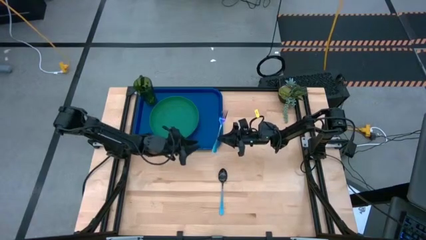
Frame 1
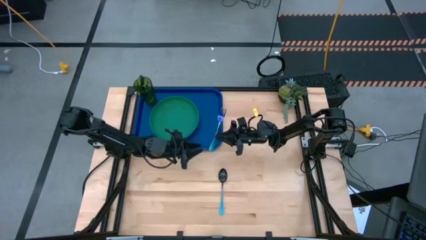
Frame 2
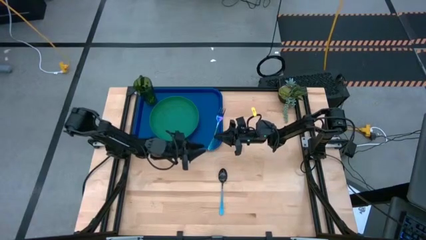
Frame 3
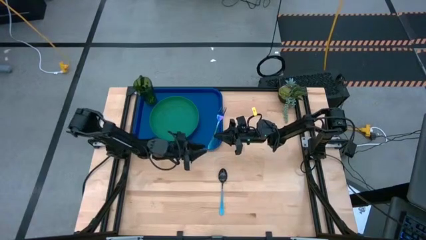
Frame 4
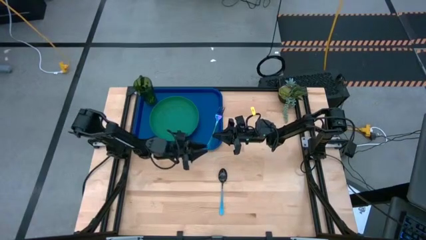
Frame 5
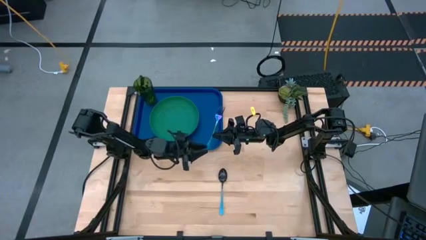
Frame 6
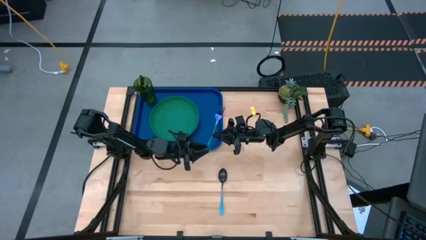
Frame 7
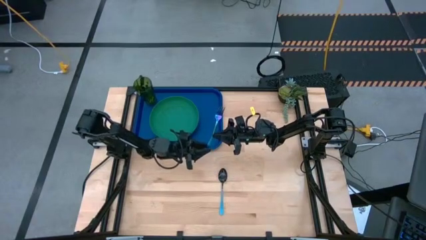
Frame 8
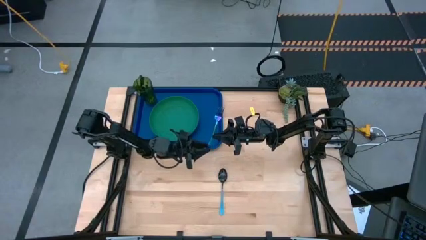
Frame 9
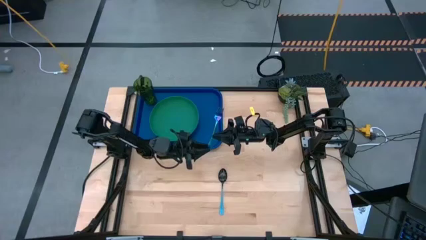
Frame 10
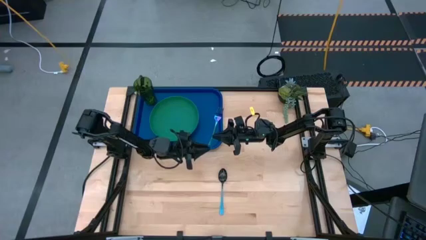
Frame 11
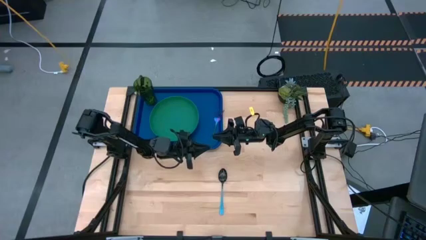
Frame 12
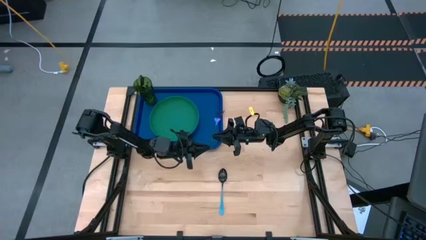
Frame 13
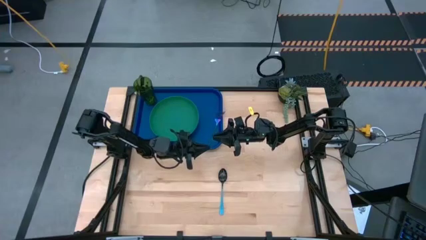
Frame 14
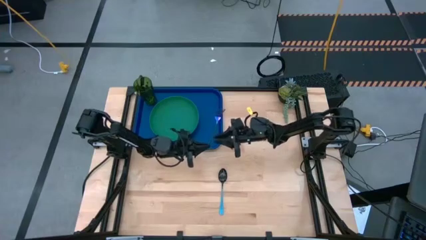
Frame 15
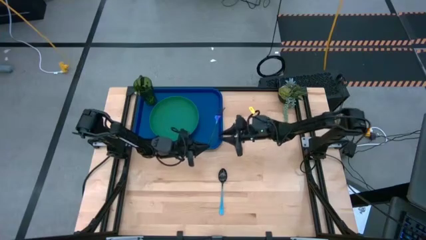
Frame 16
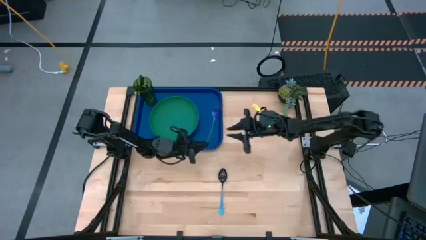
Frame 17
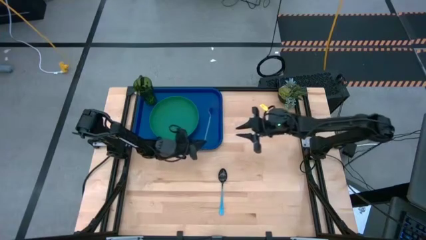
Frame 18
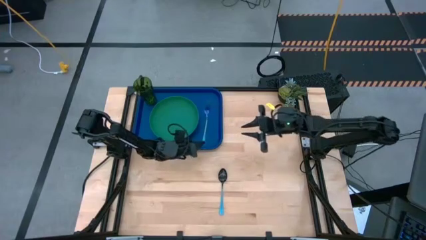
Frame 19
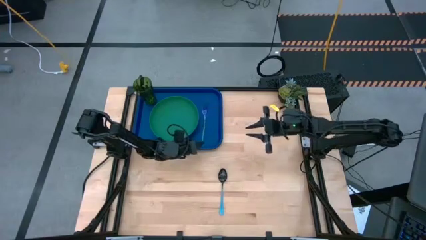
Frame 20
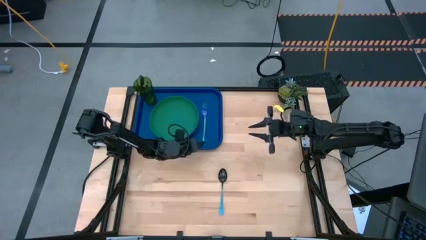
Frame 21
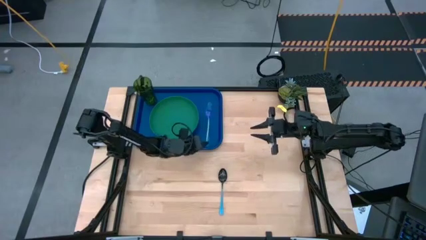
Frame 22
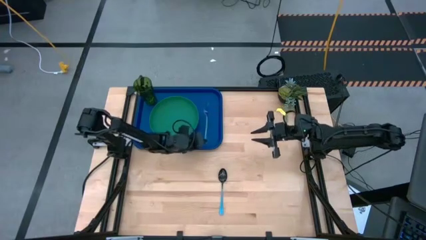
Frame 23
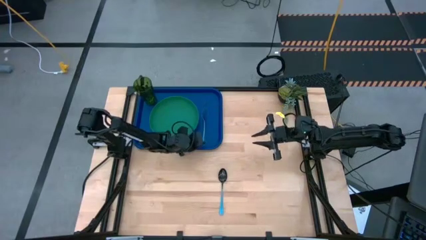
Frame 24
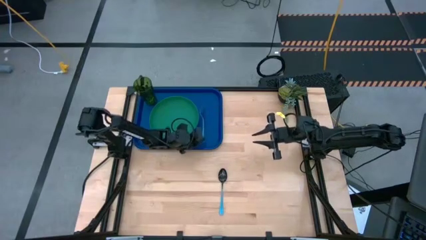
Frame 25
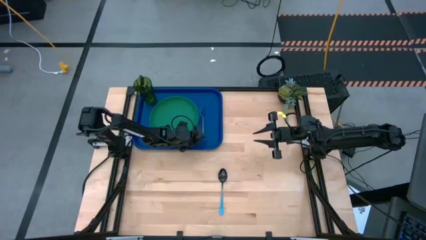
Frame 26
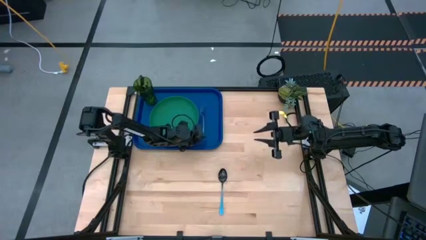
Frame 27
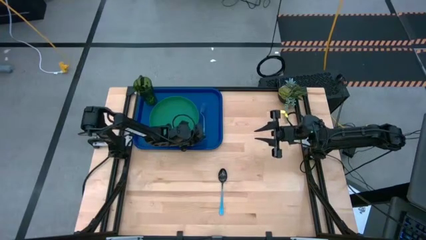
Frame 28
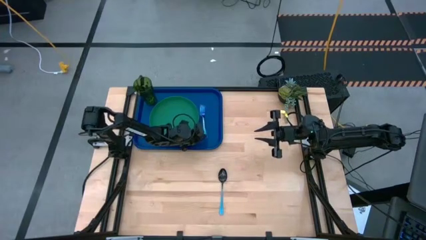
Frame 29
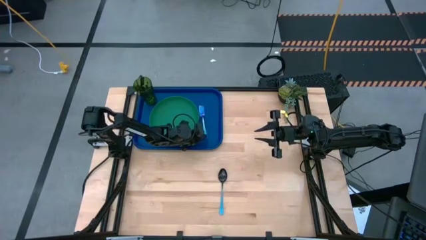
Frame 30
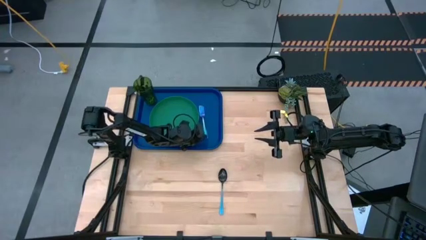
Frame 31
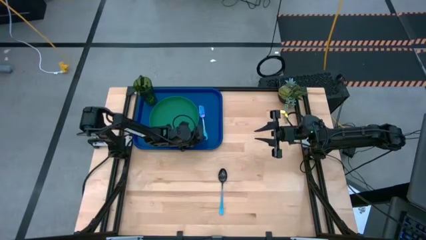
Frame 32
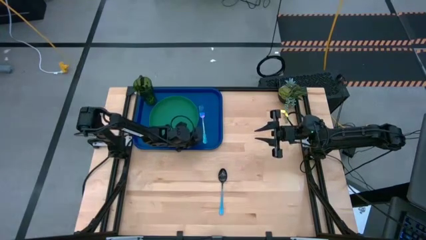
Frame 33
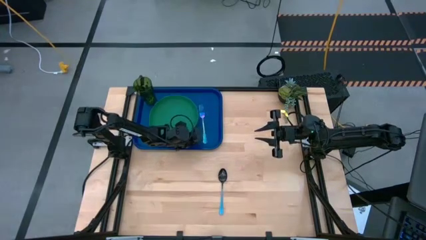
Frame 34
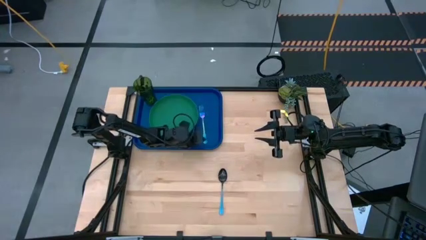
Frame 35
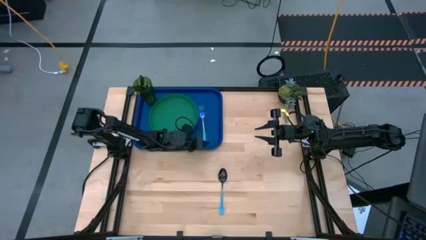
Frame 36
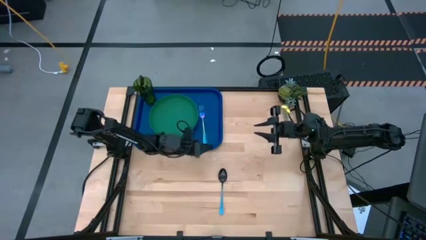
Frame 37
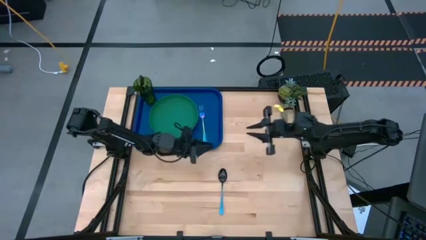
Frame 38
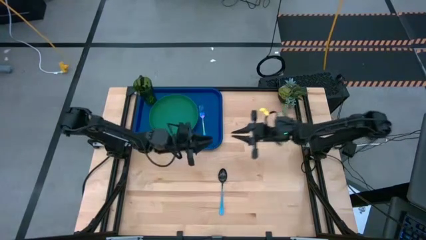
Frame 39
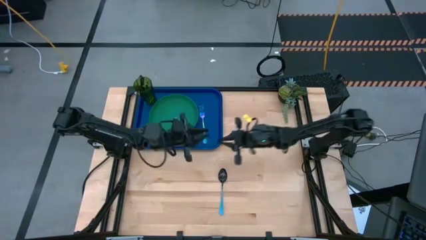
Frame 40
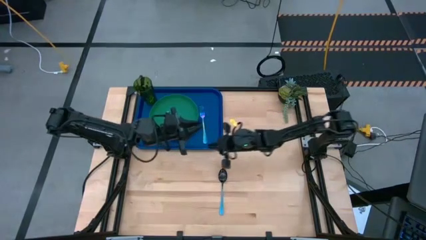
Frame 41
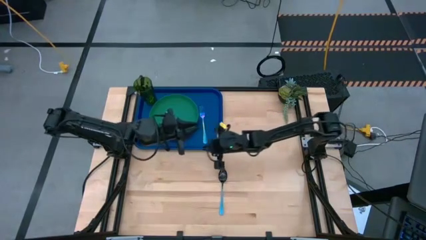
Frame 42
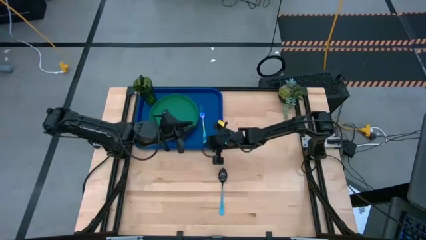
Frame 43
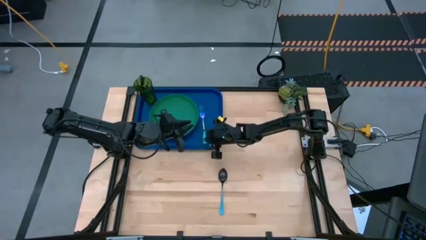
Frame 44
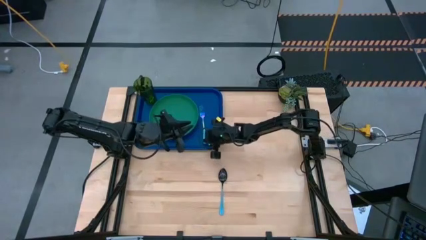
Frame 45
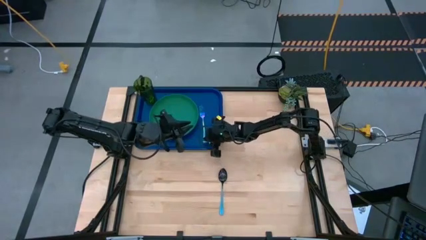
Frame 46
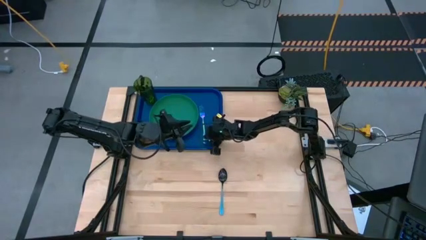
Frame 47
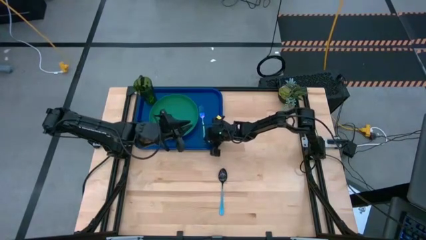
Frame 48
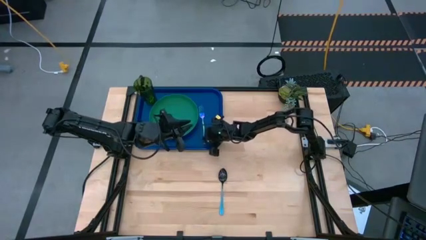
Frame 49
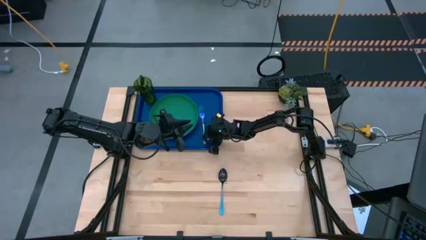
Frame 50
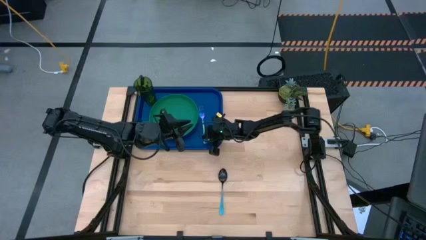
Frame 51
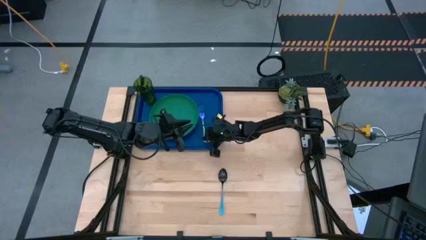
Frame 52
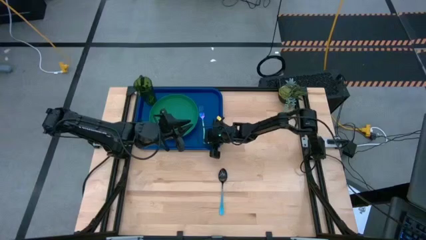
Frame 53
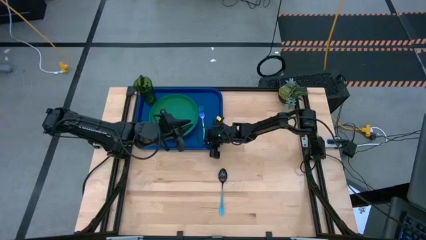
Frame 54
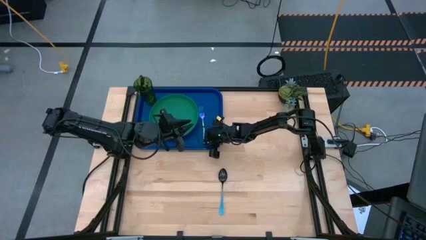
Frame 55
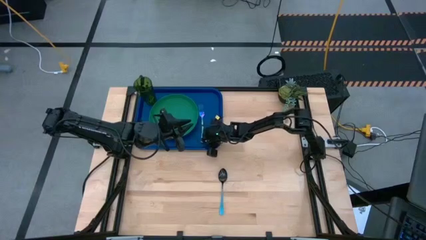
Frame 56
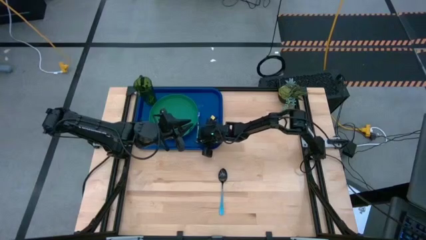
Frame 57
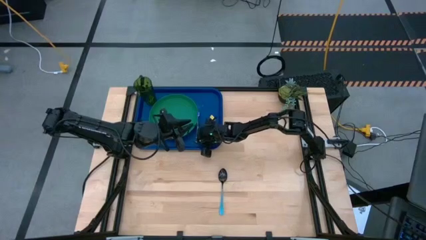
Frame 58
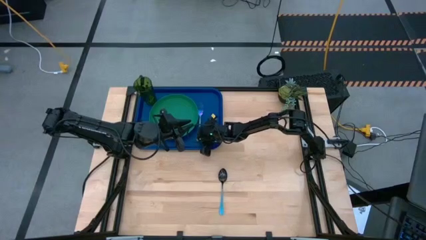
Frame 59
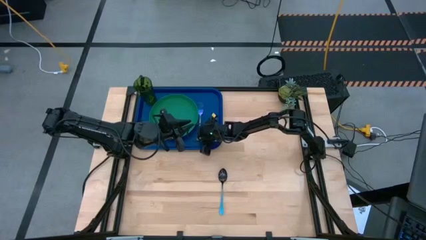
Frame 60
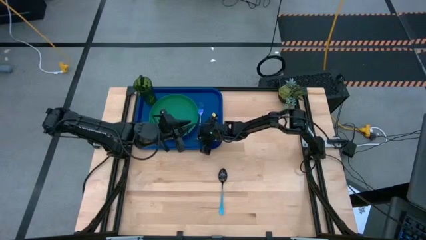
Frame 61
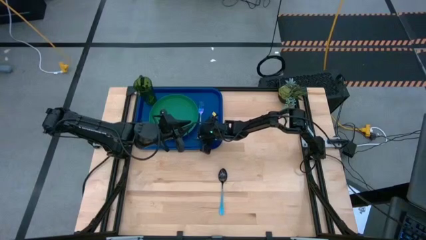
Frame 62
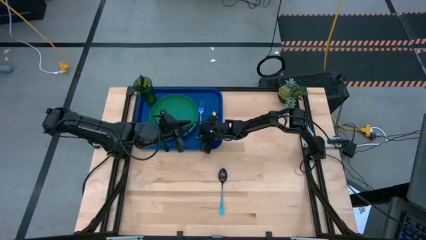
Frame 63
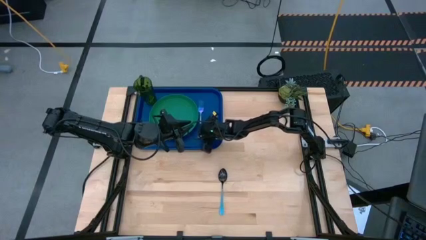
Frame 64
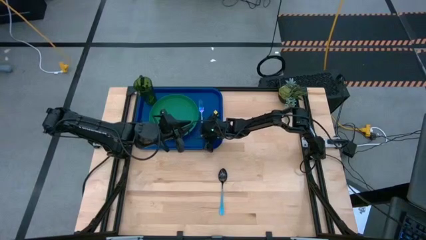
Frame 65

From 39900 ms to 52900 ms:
Task: Pick and place plate/cup/fork/spoon on tray
Put the iridescent fork on the blue tray
